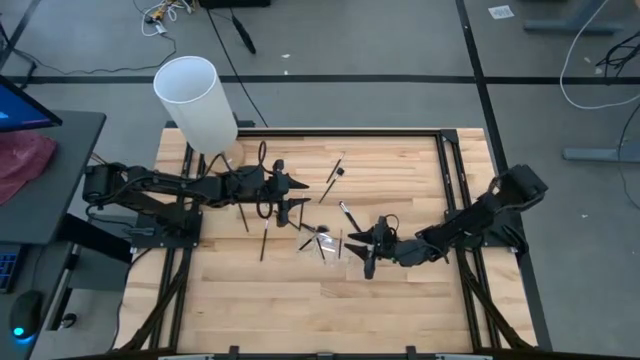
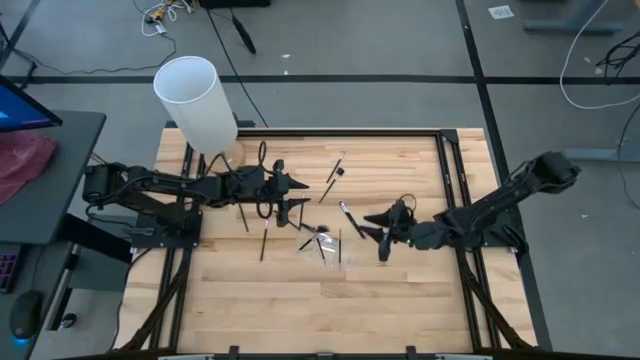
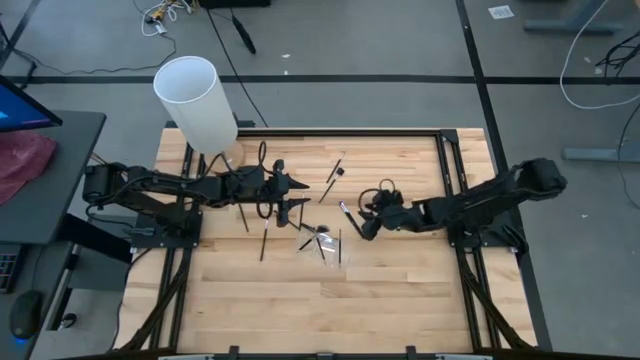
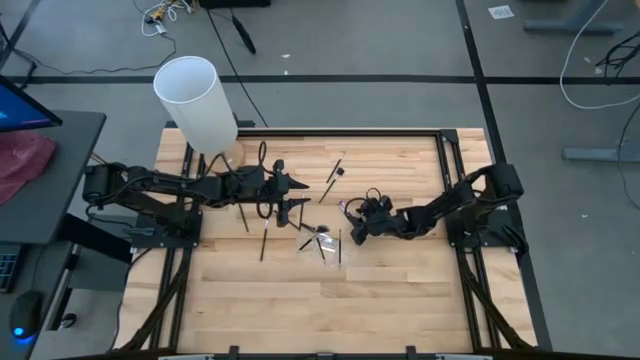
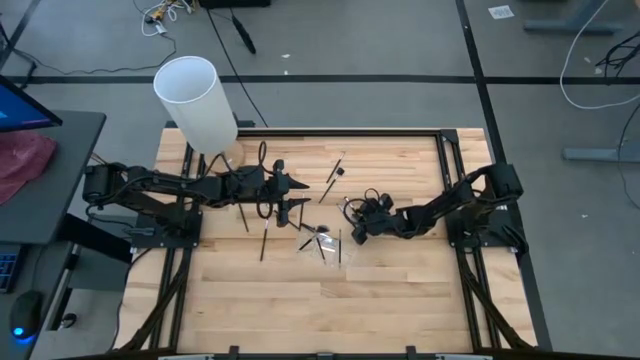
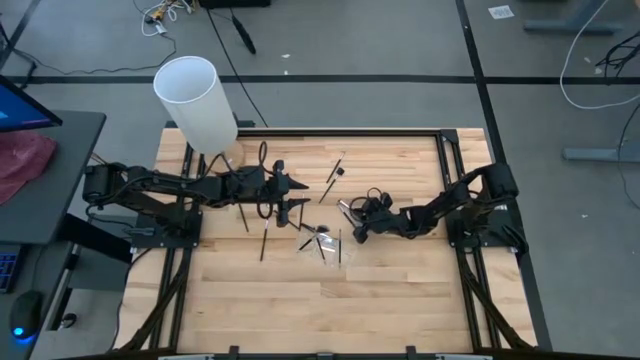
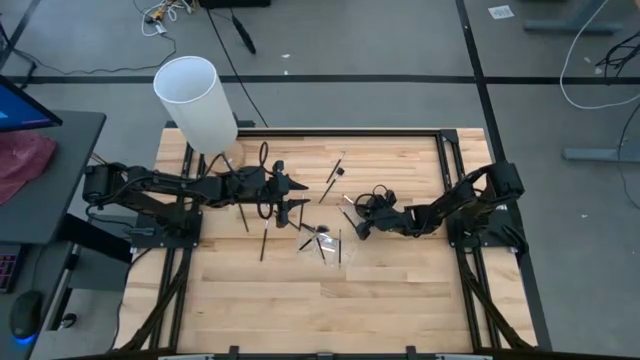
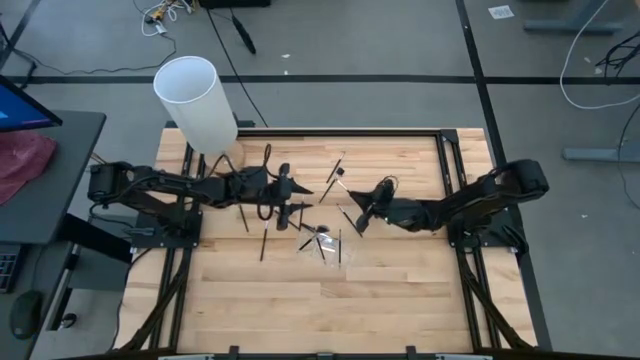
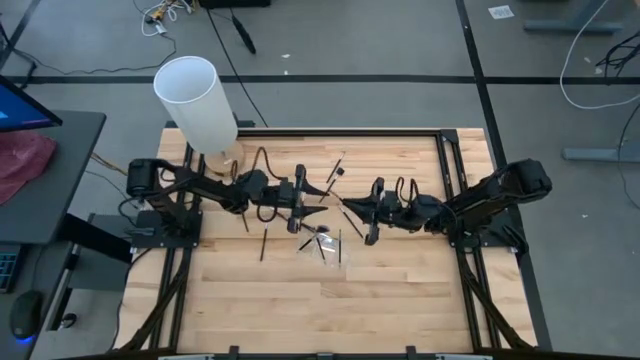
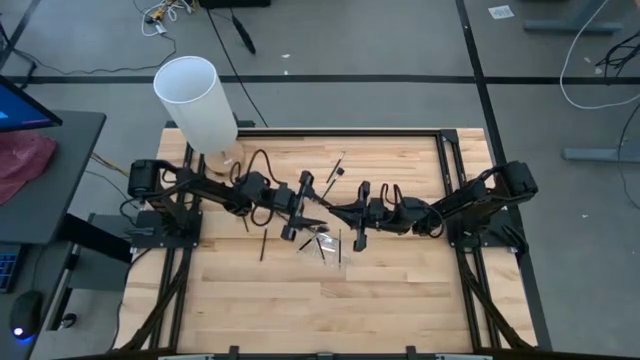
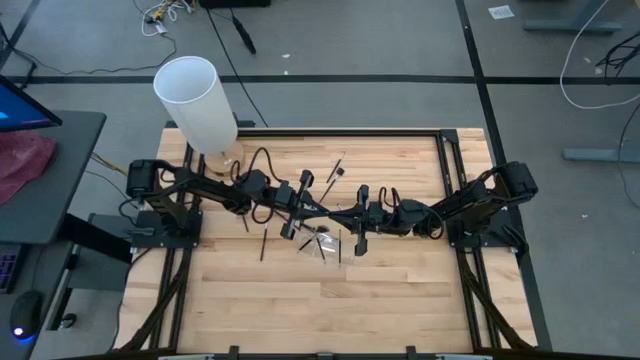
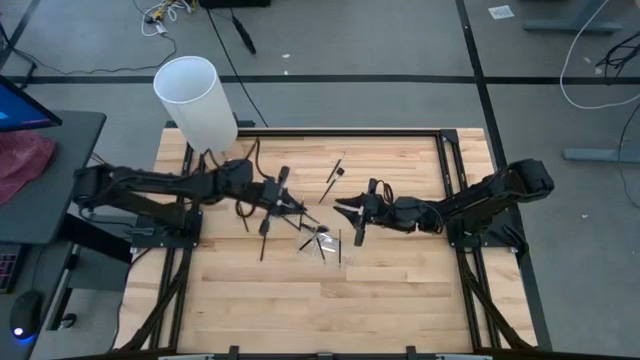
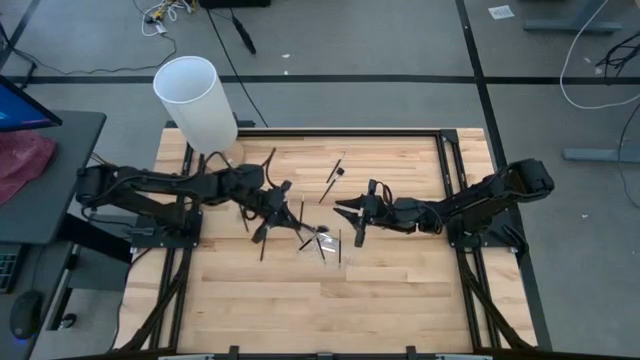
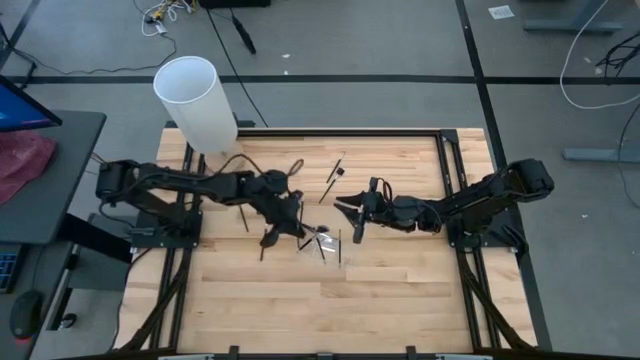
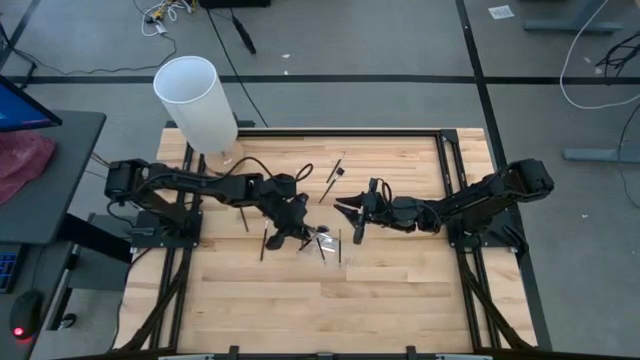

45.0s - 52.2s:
Task: Put items in baskets/containers
Put the black eyeshadow brush into the transparent organizer

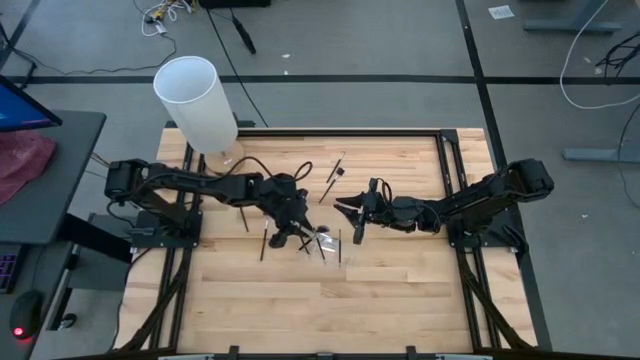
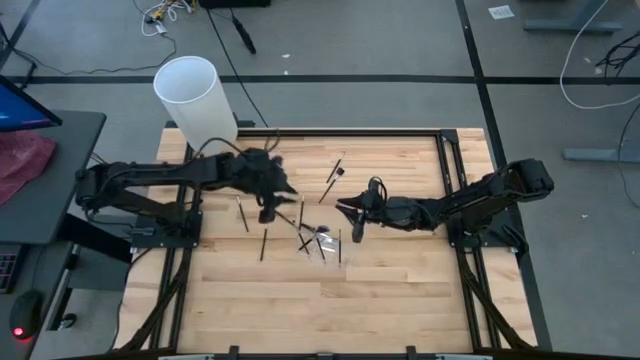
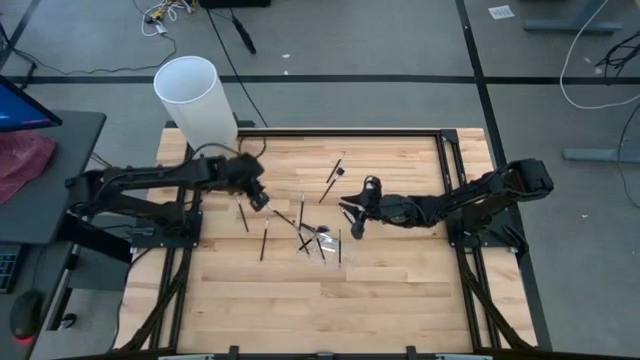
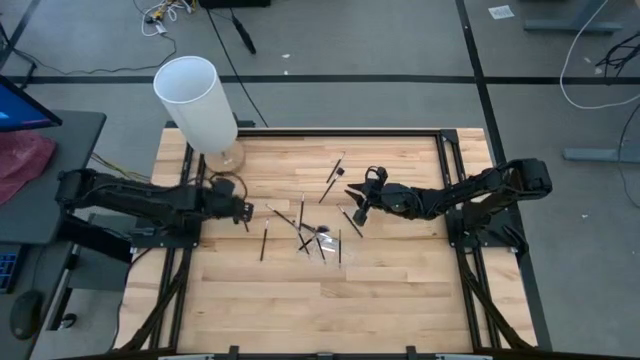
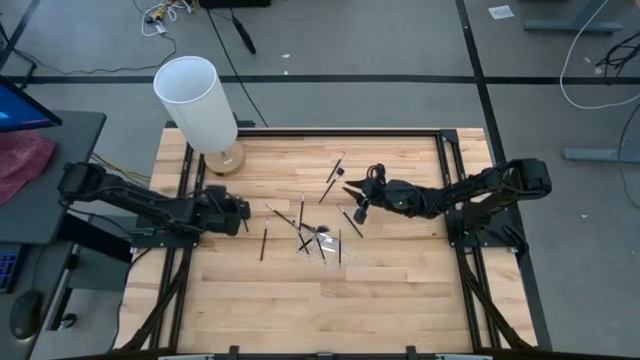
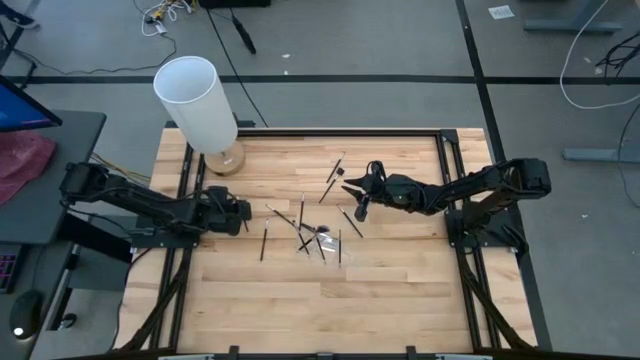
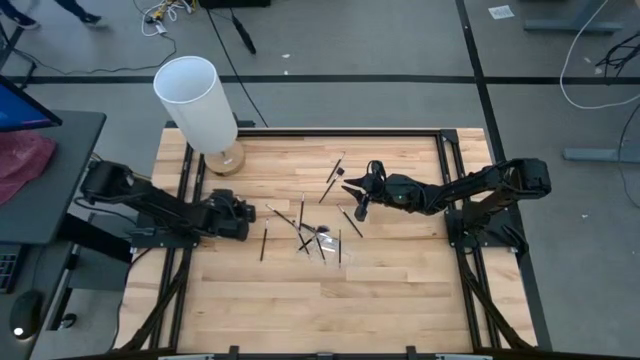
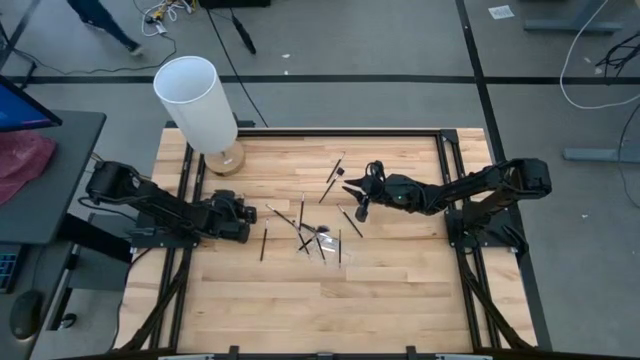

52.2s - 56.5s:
Put the black eyeshadow brush into the transparent organizer

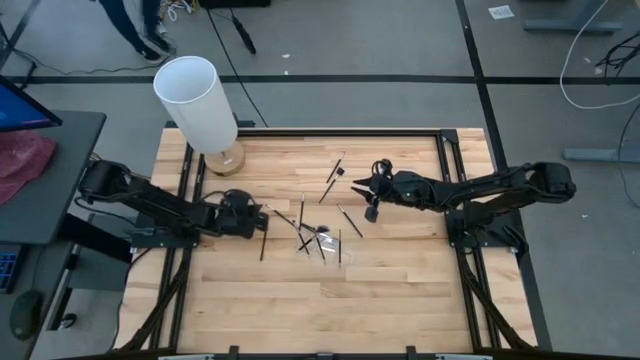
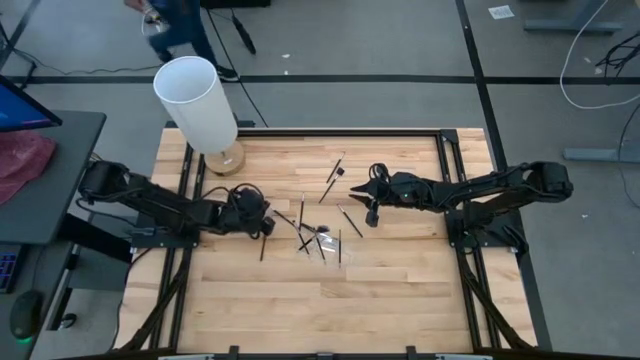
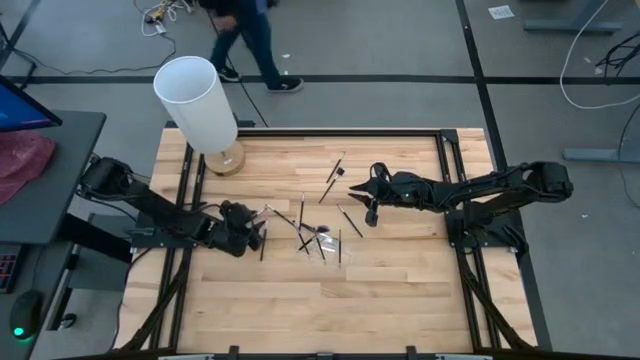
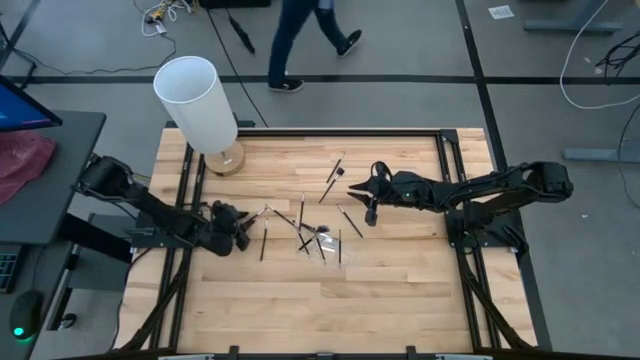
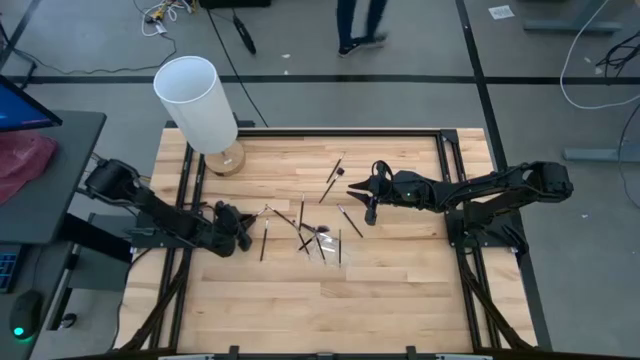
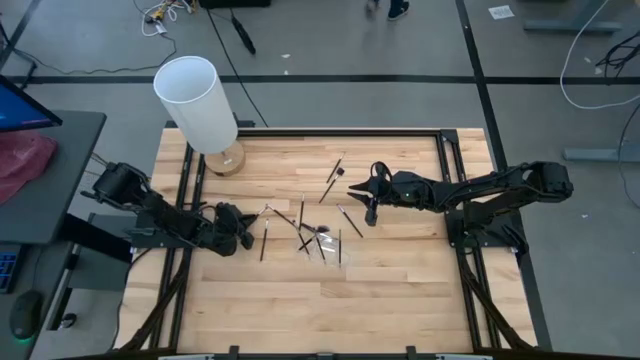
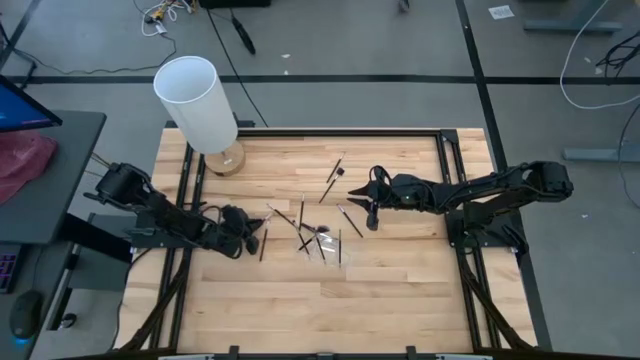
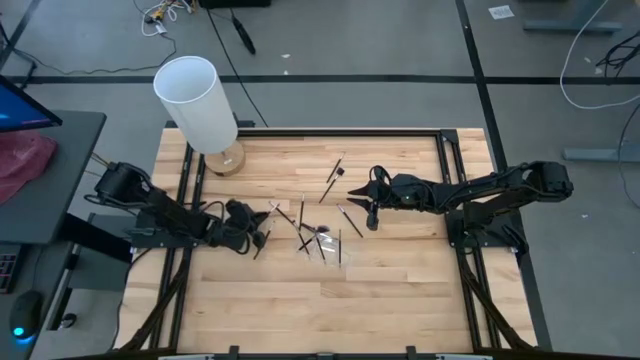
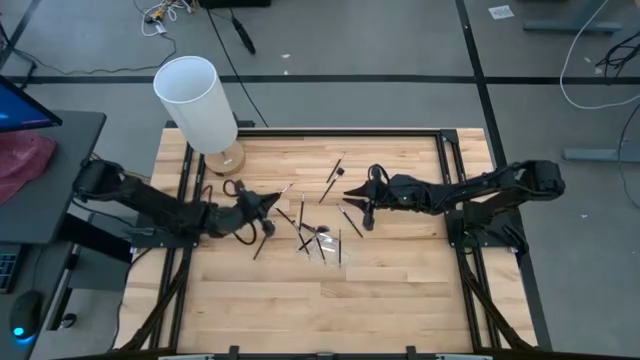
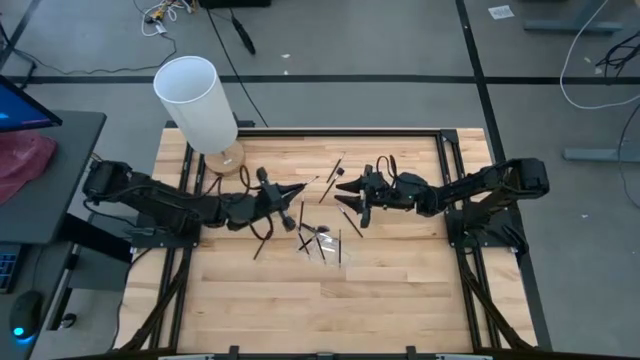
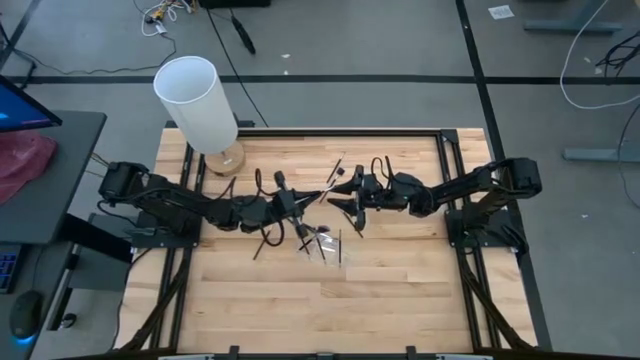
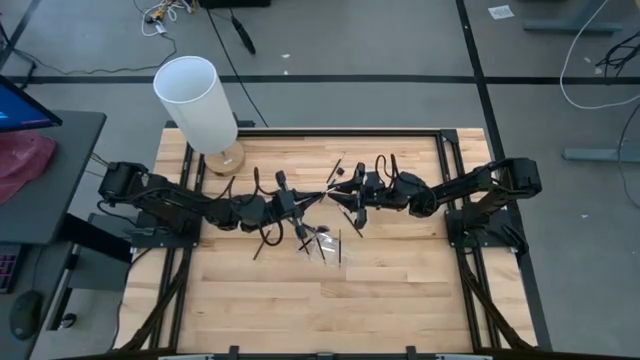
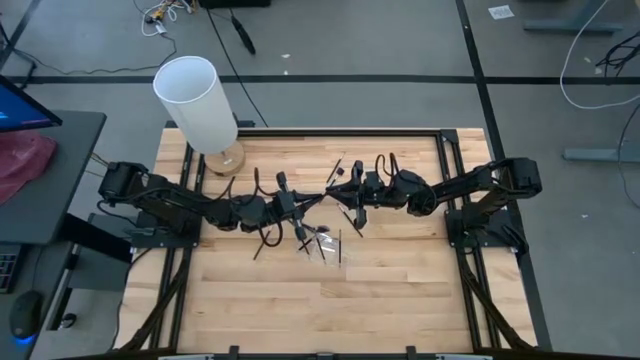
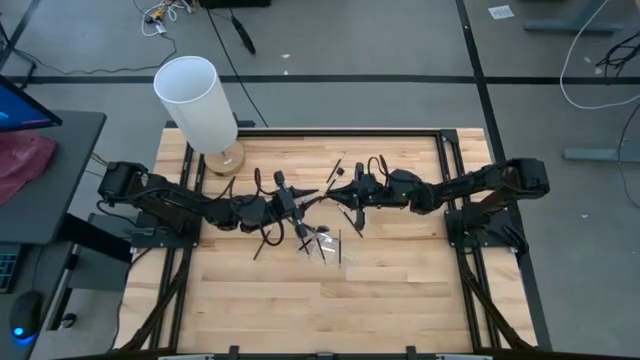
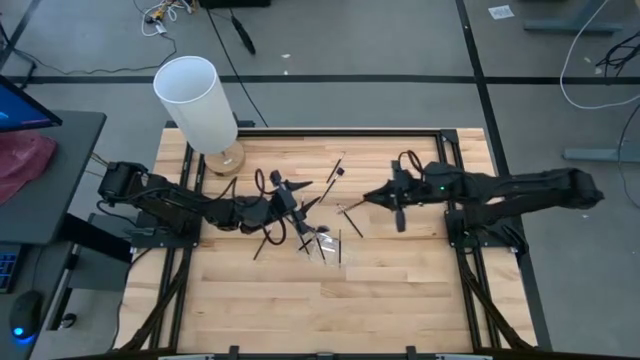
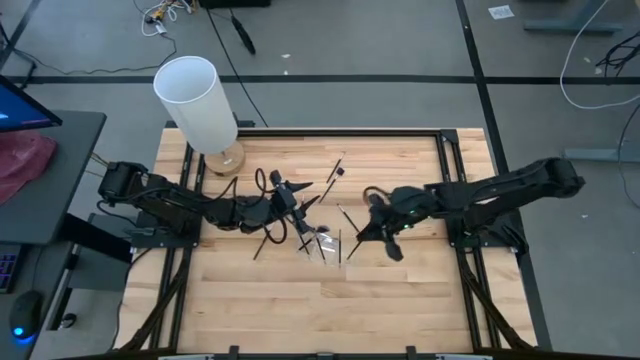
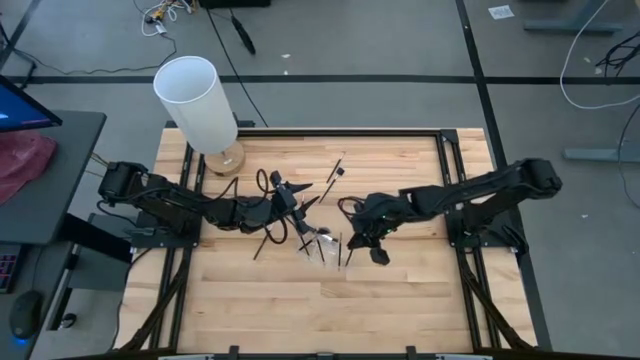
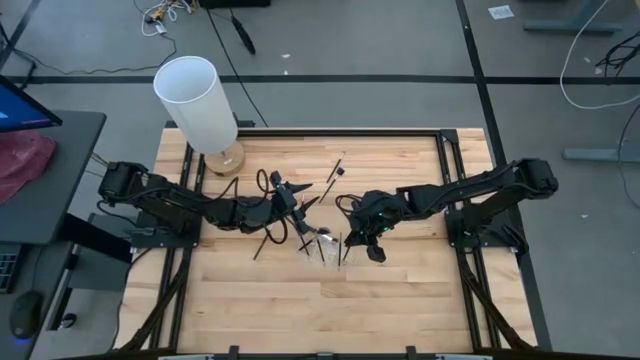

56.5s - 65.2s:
Put the black eyeshadow brush into the transparent organizer

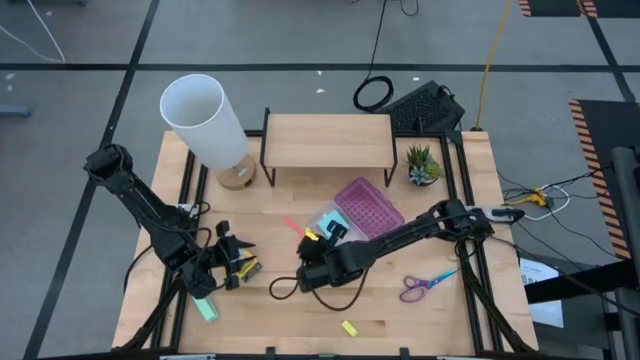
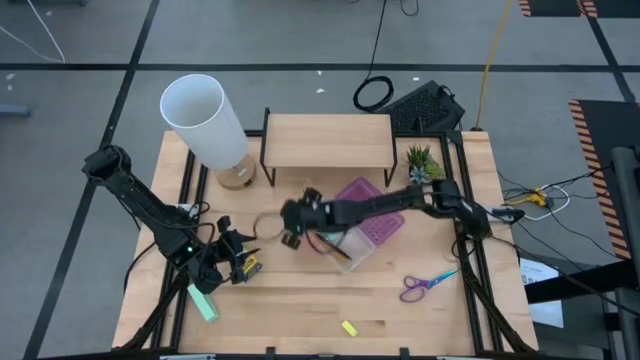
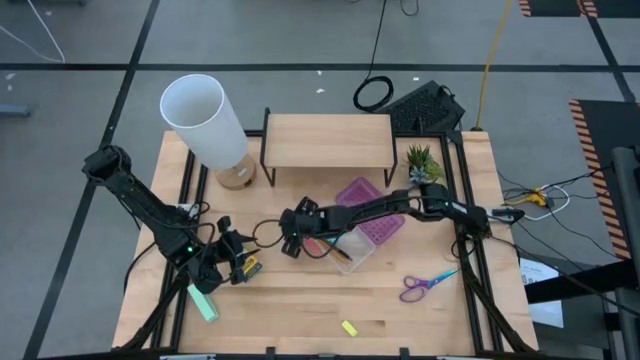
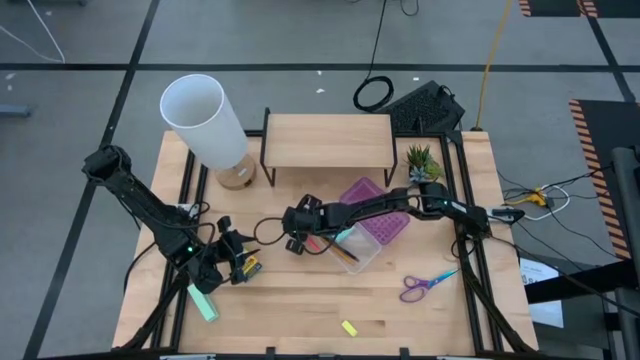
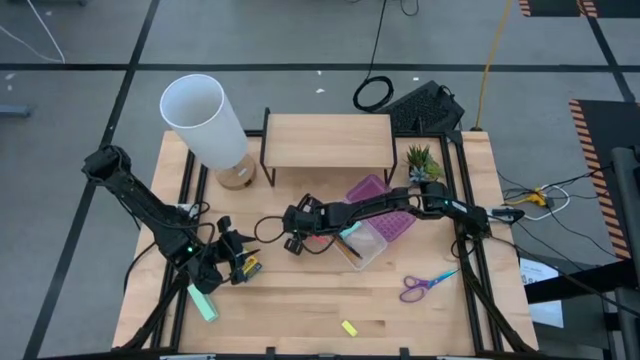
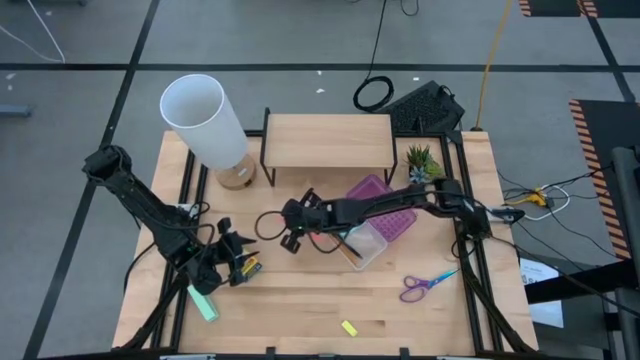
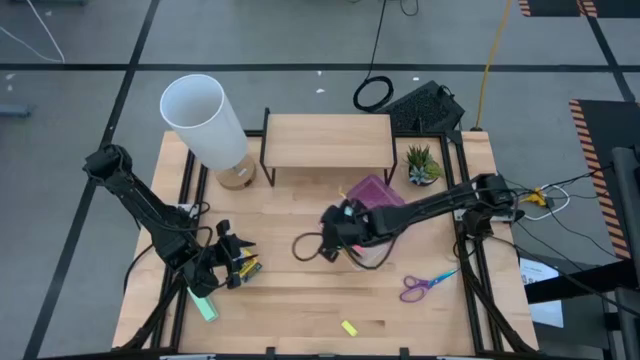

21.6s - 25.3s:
Task: Pack school essentials
Put the pink pencil into the transparent violet supply box
